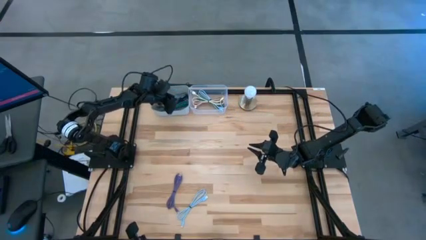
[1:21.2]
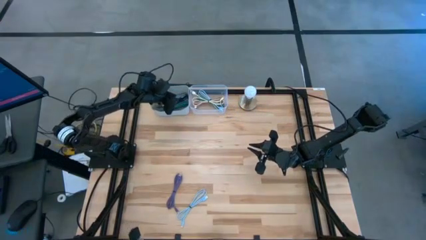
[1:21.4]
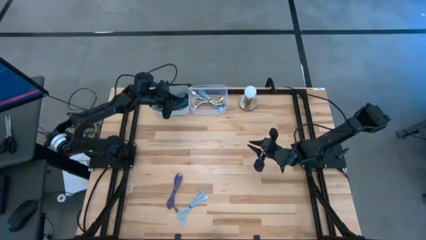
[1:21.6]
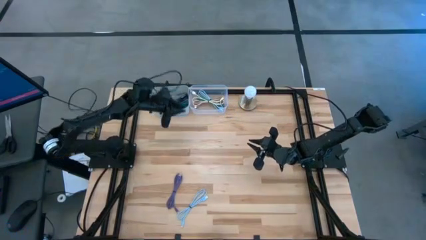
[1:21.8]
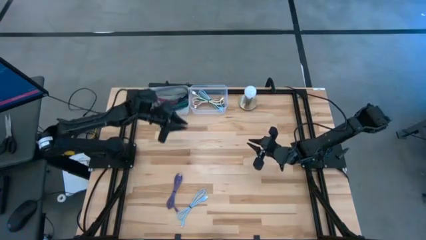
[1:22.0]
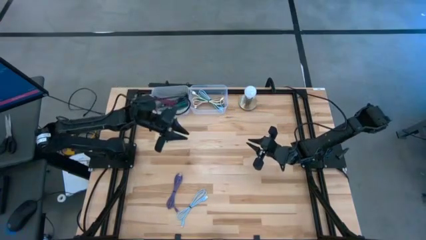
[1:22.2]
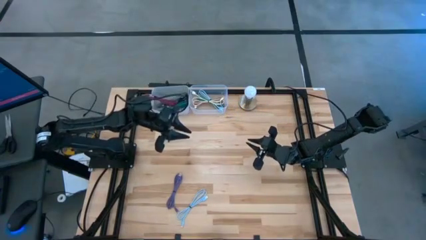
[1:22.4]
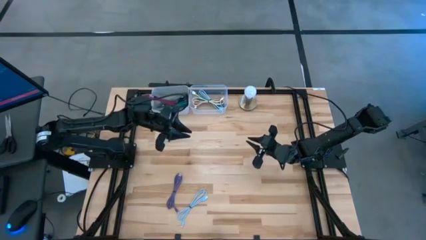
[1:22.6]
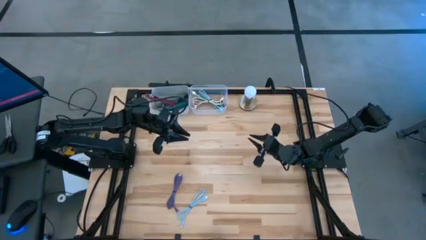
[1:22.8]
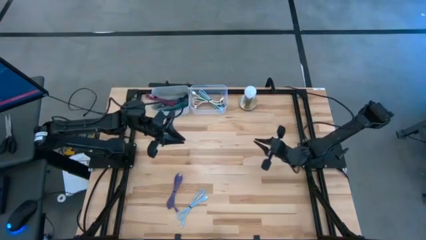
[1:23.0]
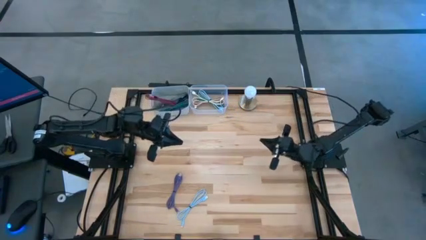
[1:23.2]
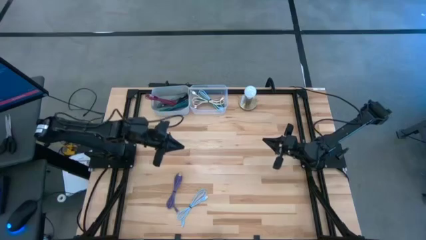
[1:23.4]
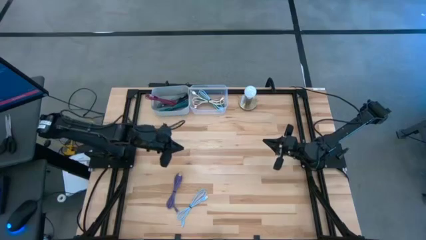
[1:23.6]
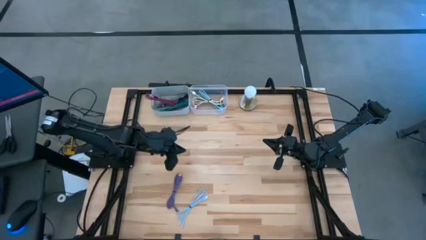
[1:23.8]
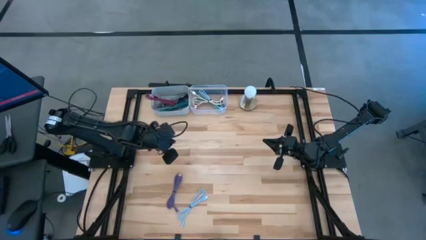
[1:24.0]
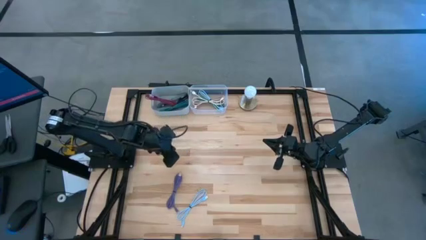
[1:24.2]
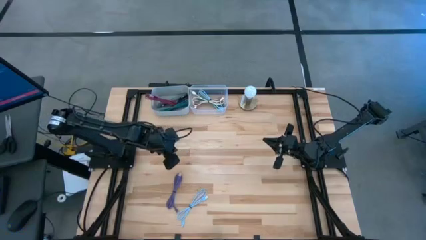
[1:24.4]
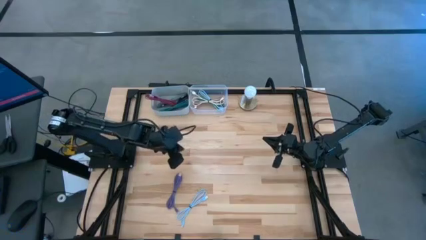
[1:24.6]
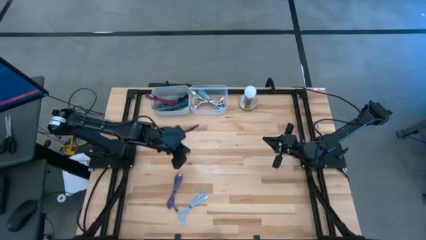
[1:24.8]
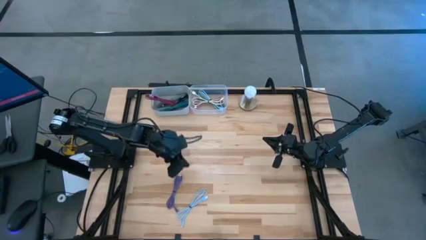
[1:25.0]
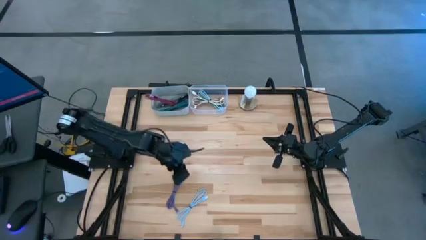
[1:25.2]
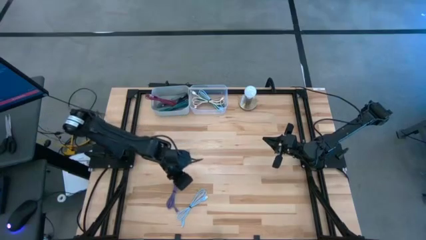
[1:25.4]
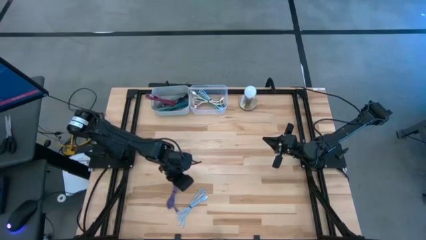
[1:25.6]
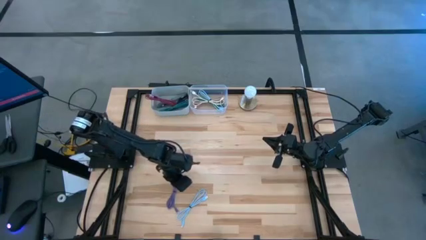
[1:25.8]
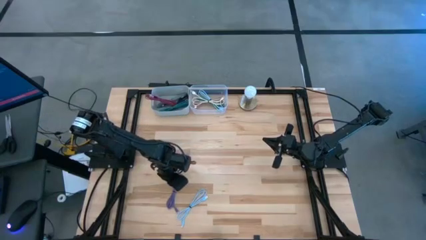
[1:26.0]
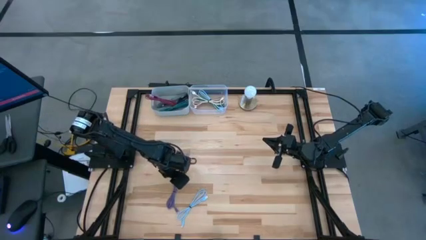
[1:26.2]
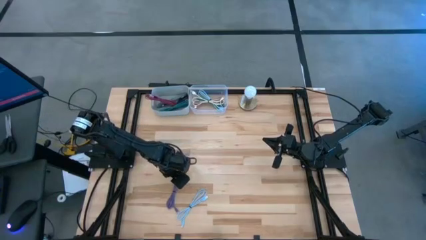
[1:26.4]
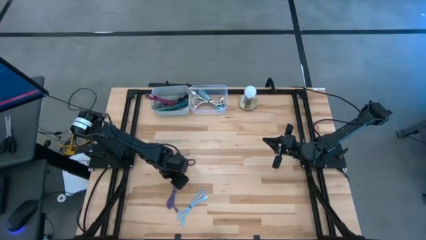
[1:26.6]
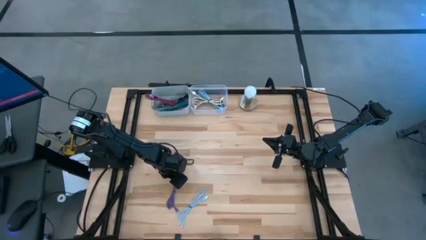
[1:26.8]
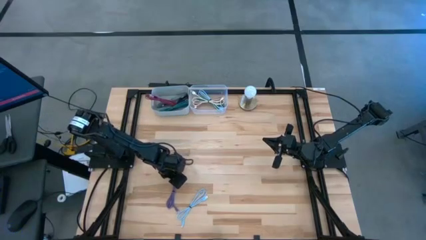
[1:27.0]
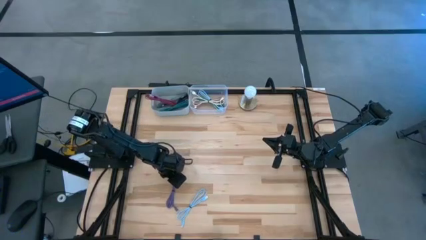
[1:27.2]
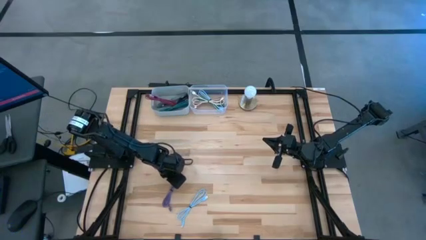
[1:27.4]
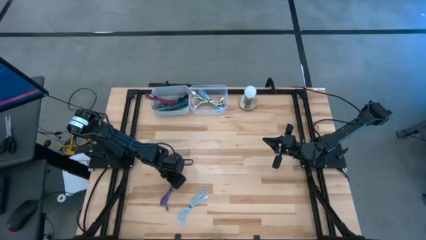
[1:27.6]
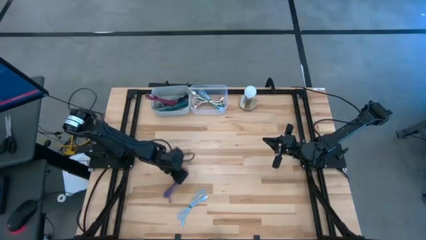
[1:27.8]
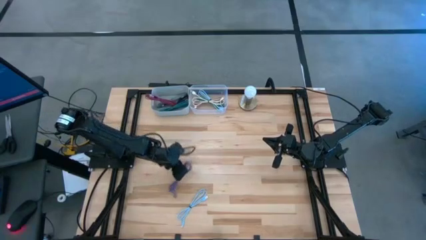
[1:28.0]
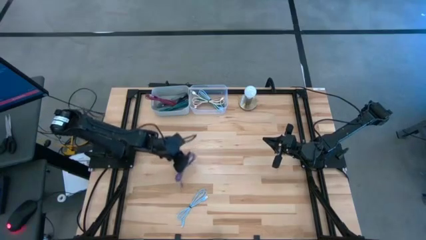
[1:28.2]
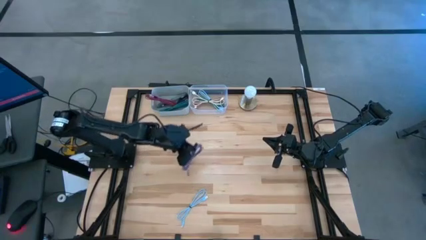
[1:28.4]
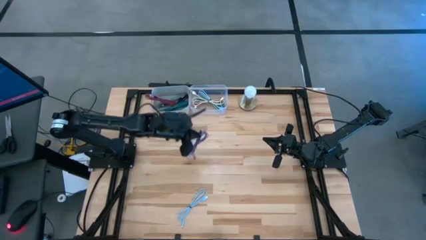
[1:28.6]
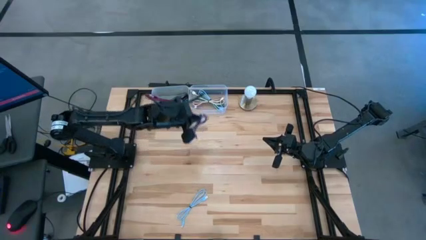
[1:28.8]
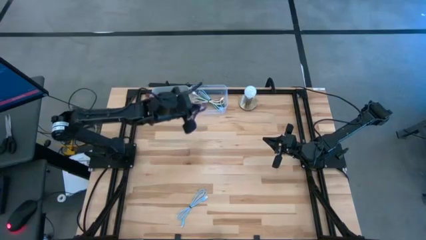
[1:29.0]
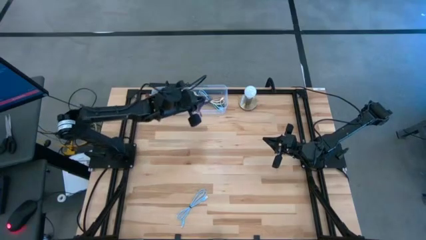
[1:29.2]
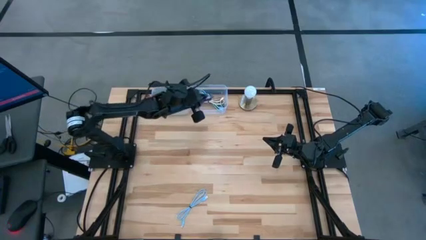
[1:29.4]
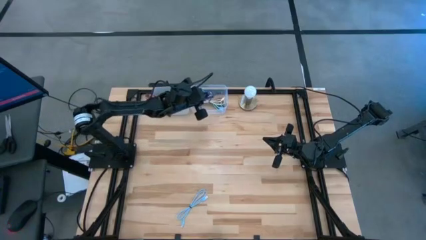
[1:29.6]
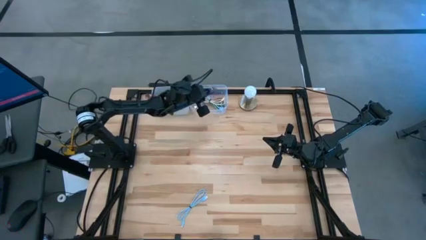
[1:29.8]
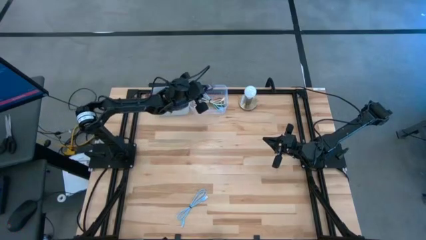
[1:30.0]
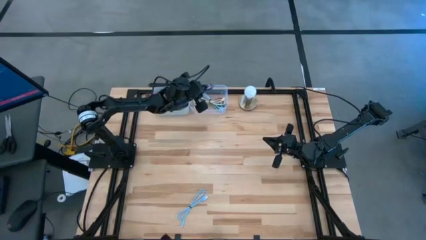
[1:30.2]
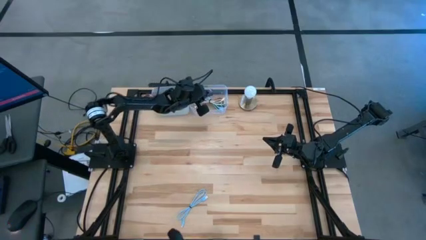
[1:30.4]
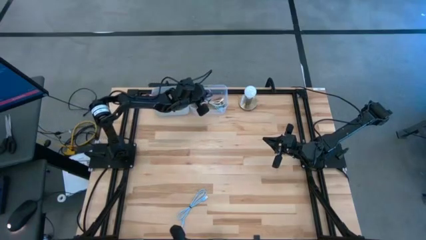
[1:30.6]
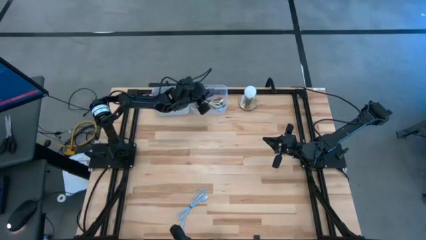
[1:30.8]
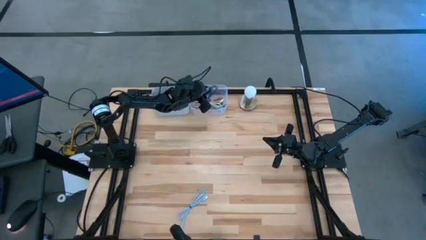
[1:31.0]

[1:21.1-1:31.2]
Task: Pick & Place USB Port
Put the violet USB cable into the transparent bin

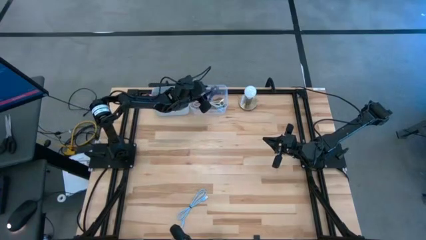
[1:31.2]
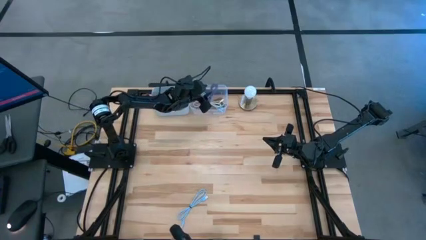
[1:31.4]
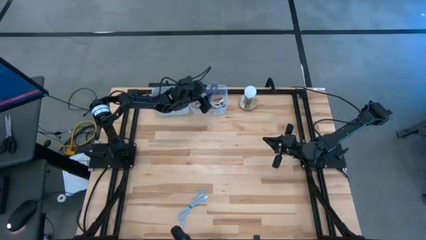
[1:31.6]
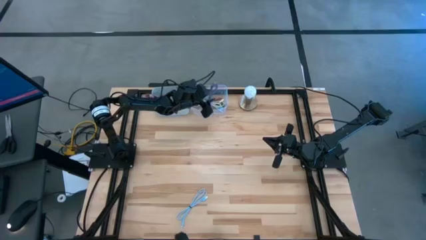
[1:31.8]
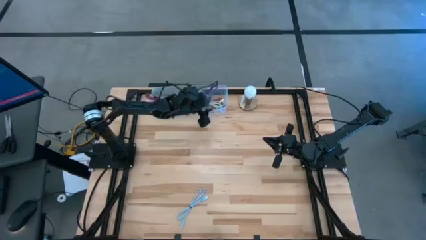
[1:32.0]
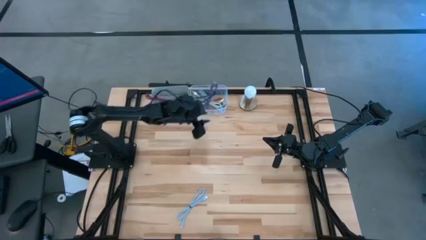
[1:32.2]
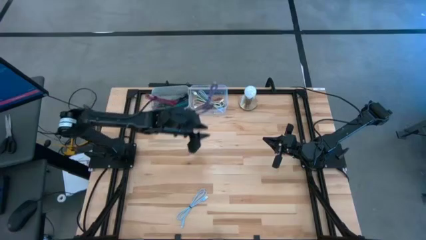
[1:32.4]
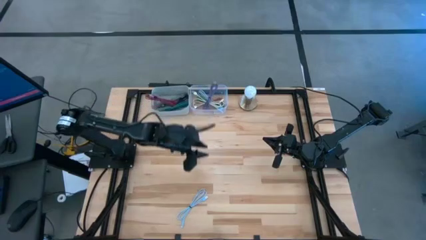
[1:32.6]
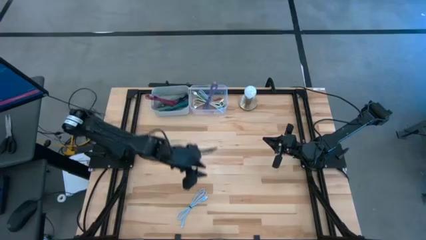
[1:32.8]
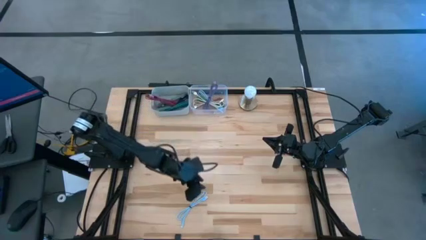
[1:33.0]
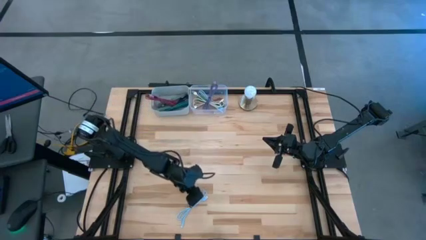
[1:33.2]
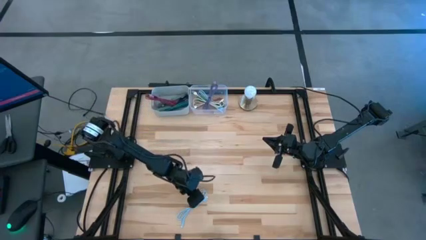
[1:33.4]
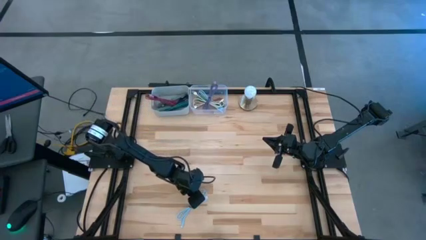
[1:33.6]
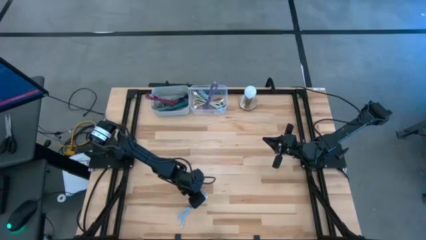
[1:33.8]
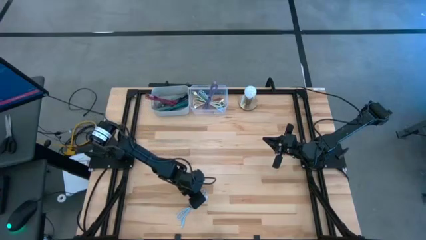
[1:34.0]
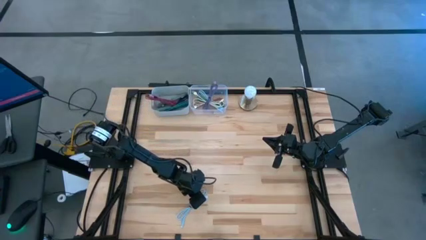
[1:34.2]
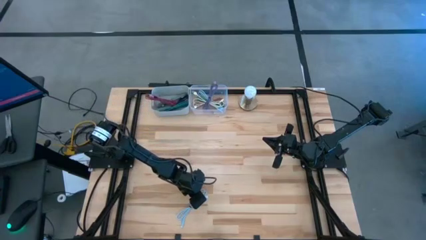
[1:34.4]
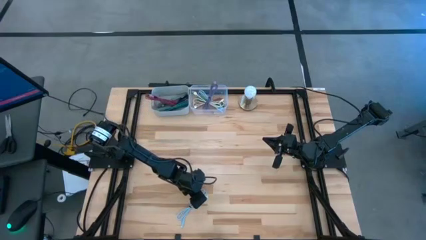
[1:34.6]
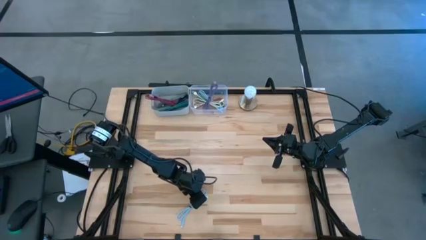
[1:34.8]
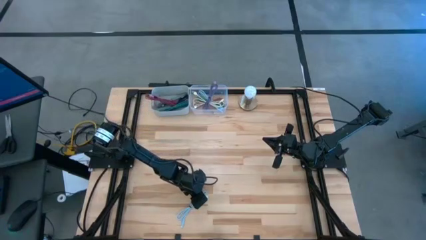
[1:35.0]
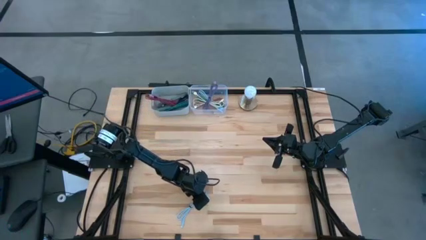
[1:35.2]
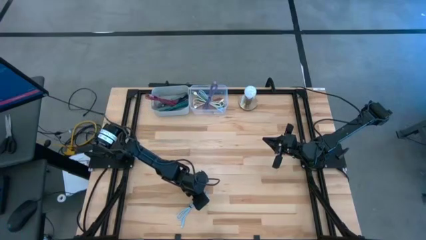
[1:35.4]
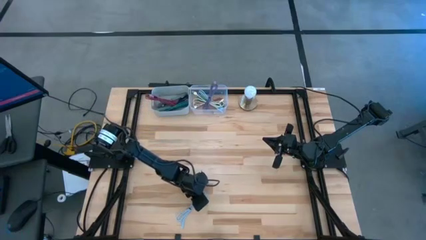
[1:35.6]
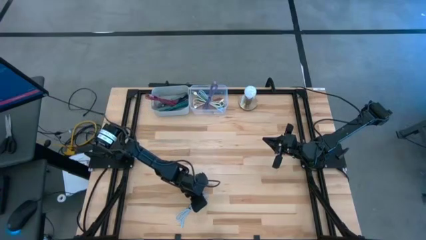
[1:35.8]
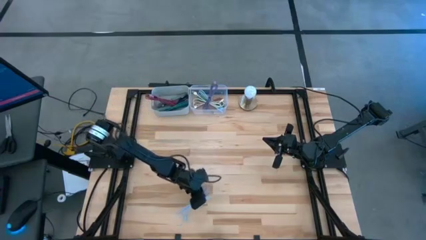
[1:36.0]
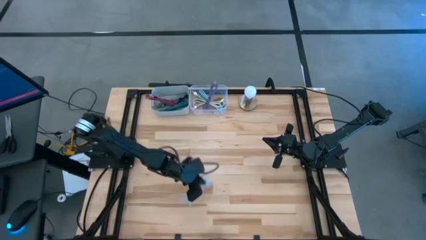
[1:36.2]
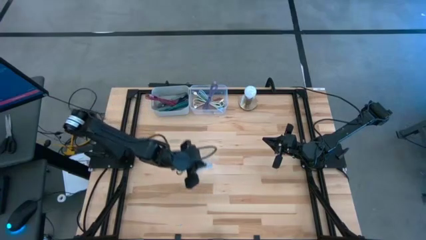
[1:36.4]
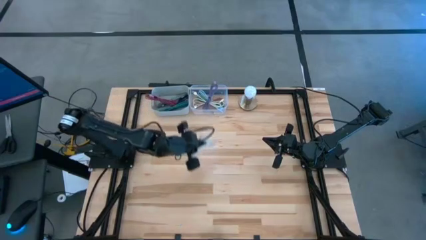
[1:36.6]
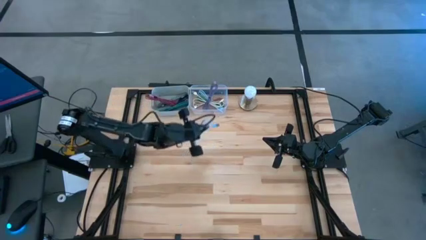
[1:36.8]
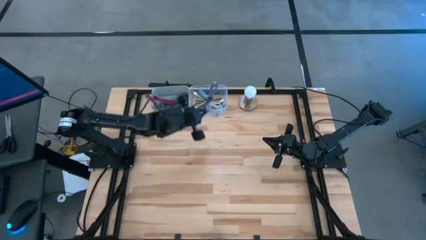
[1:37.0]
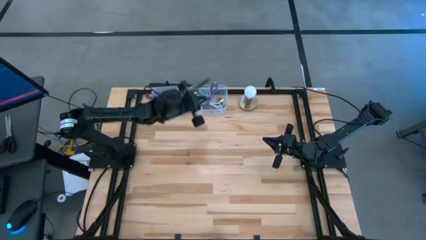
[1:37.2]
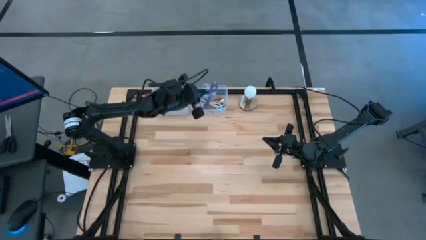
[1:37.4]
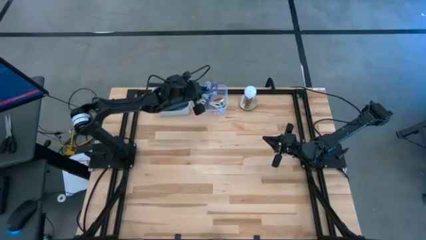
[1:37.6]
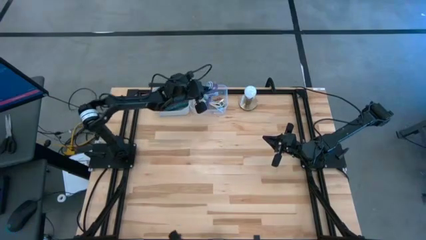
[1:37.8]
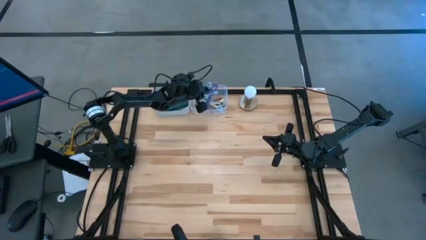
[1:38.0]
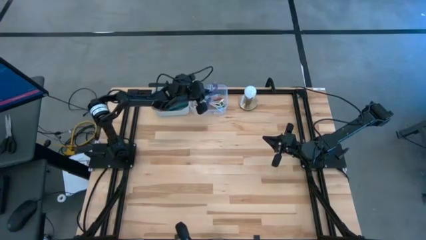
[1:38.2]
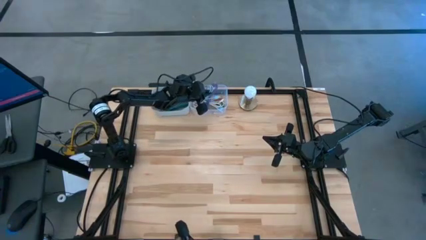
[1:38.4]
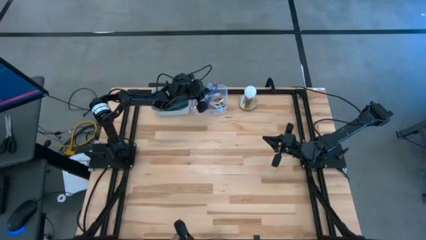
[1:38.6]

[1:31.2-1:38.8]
Put the light blue USB cable into the transparent bin
